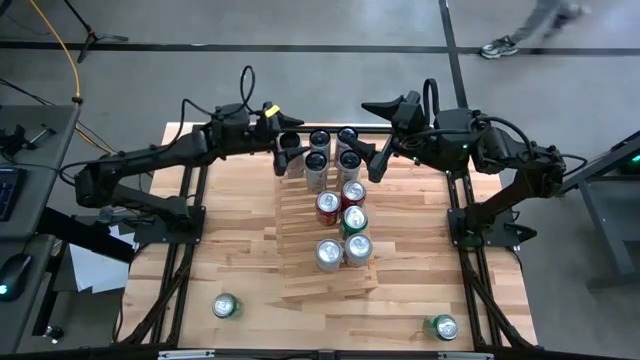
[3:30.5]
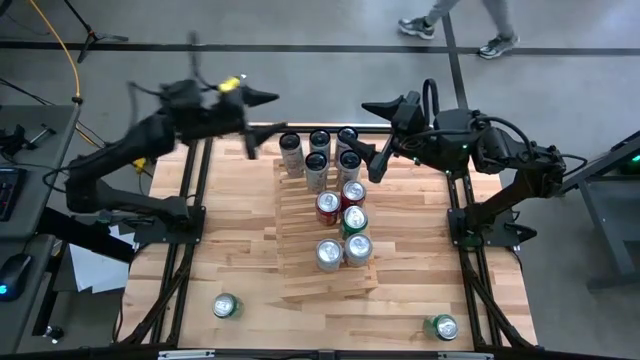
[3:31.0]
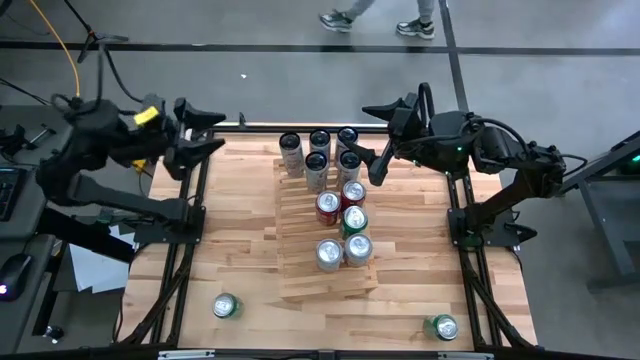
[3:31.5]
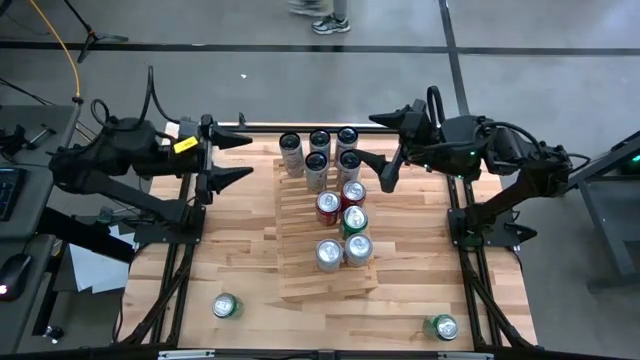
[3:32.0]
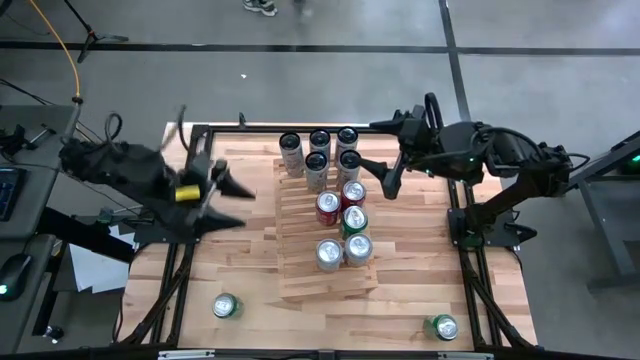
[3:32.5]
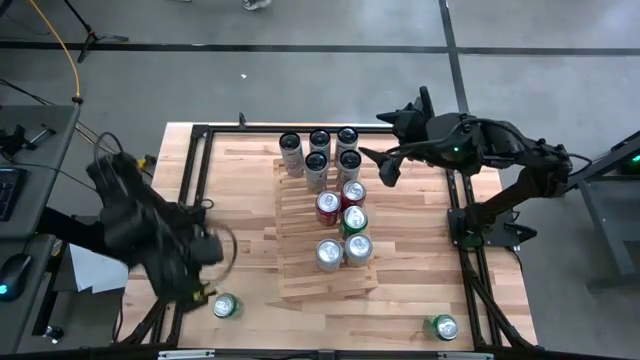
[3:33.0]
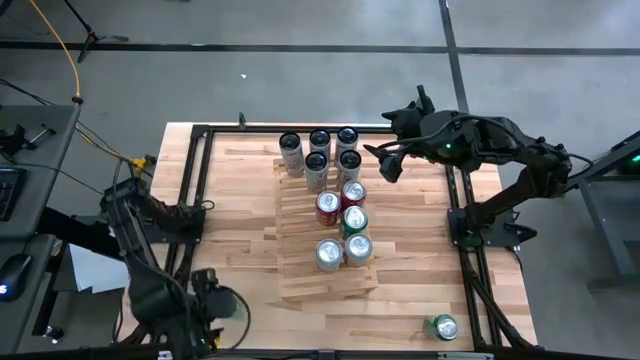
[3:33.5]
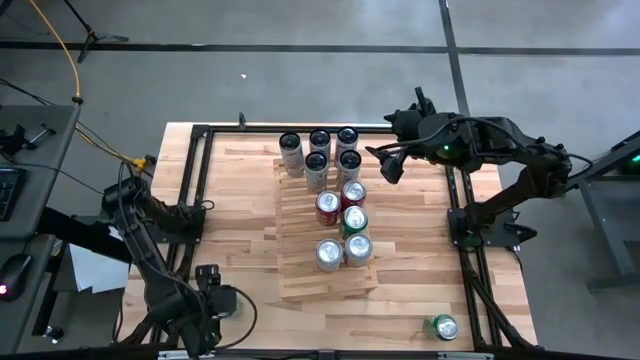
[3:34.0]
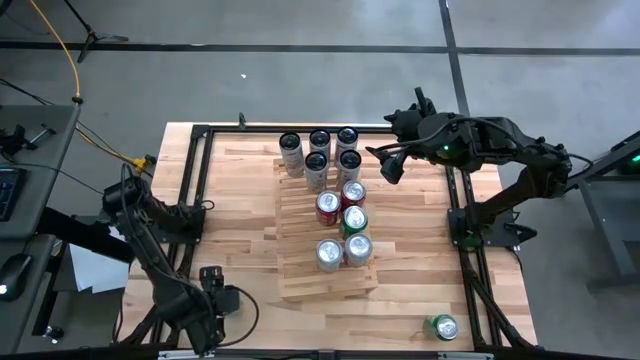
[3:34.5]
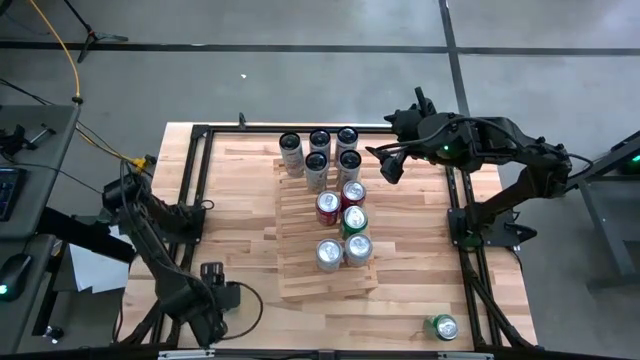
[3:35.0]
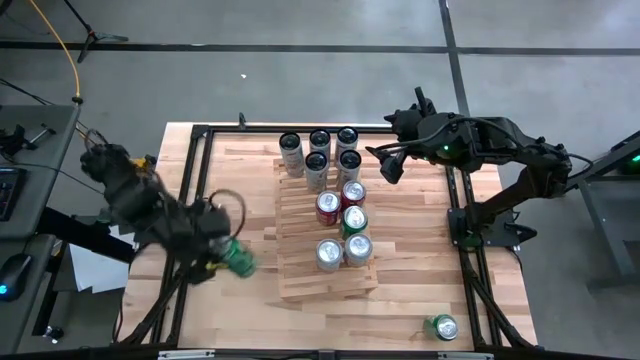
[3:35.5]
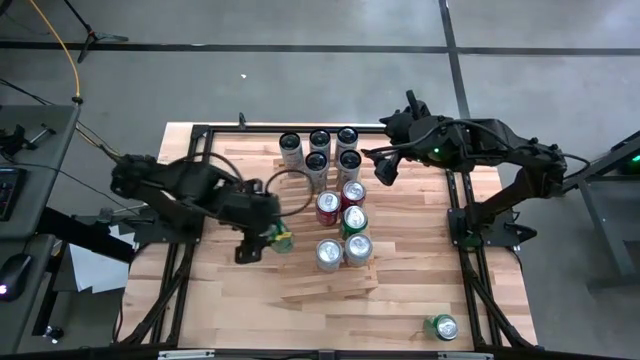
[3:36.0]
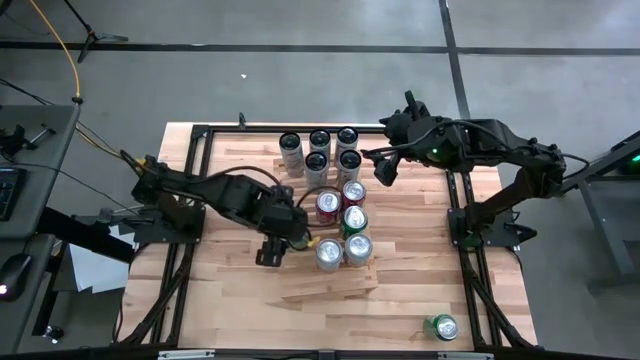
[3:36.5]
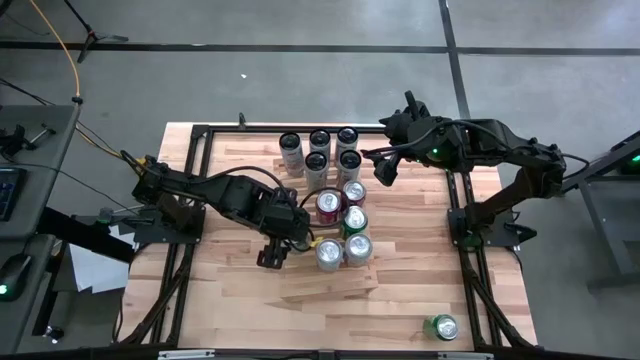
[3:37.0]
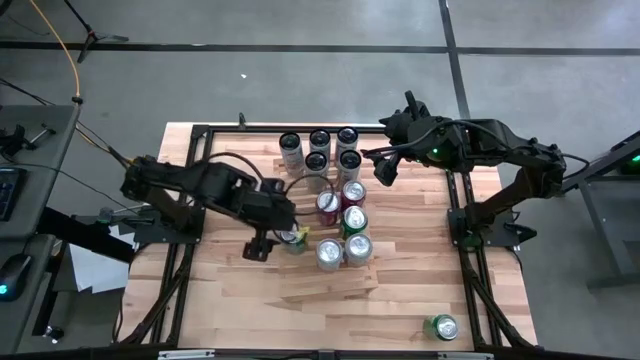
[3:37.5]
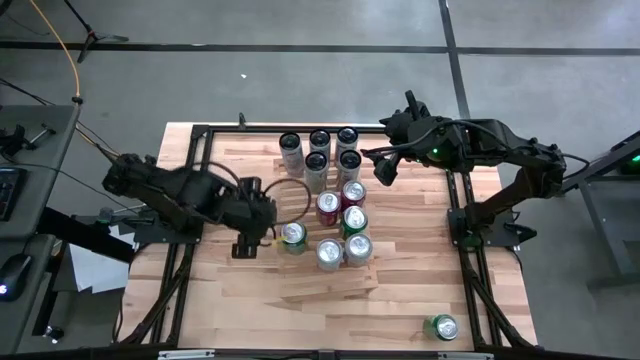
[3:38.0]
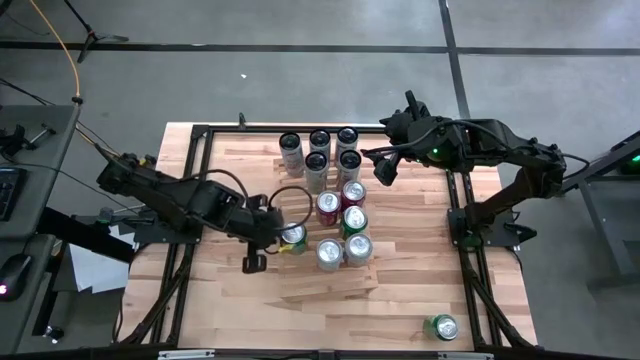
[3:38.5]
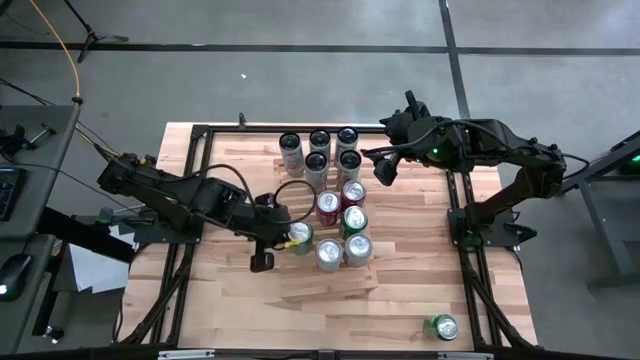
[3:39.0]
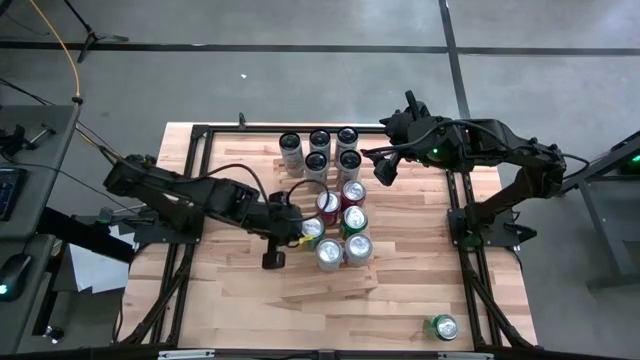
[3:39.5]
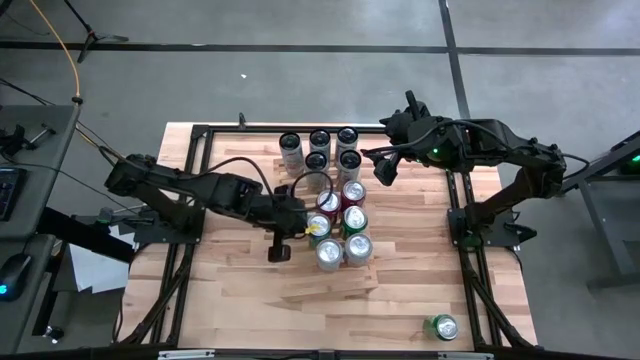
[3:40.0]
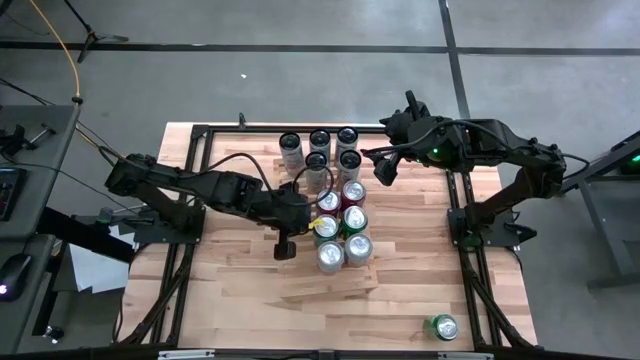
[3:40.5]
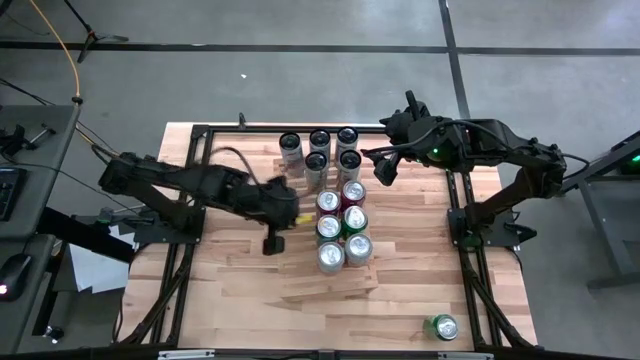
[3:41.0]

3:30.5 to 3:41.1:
Task: Place canned beverage on shelf
Put the green white soda can on the shelf

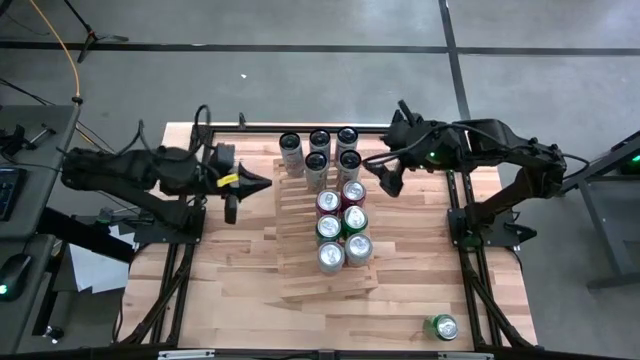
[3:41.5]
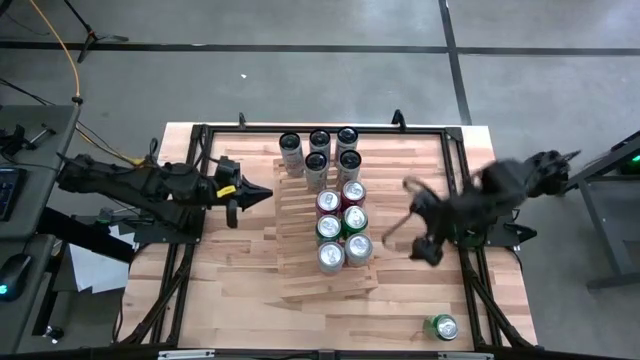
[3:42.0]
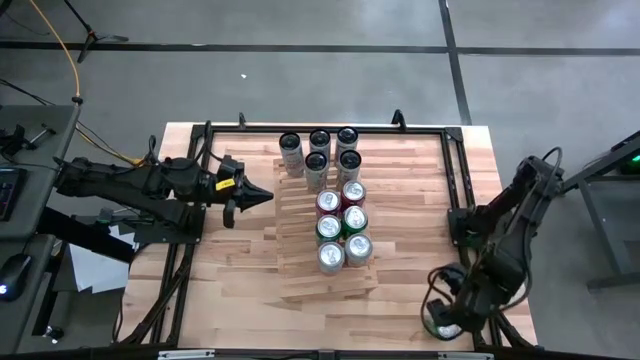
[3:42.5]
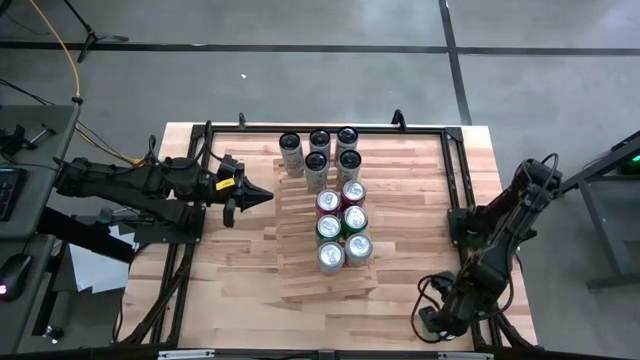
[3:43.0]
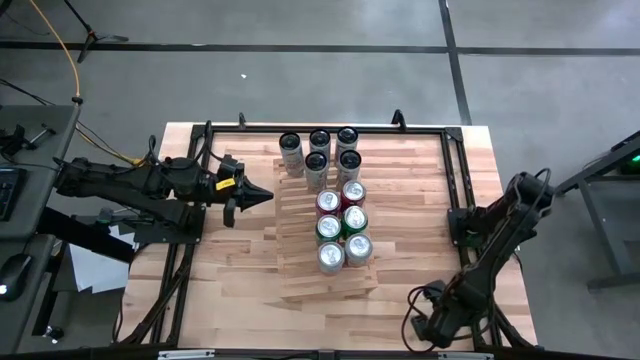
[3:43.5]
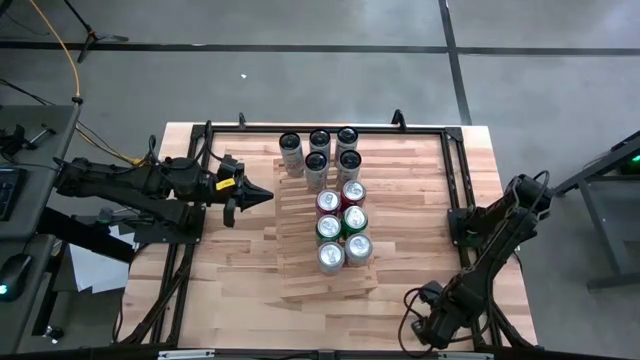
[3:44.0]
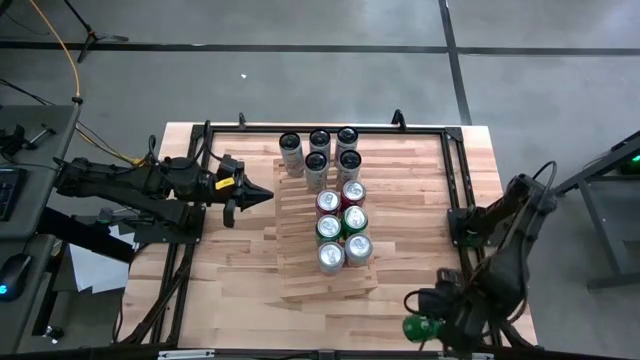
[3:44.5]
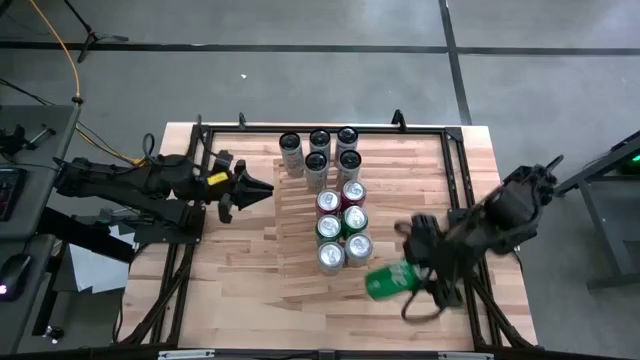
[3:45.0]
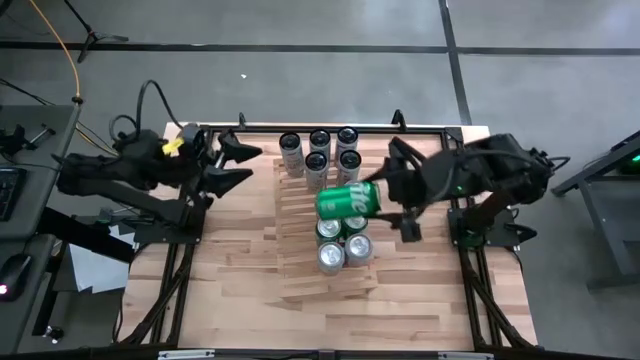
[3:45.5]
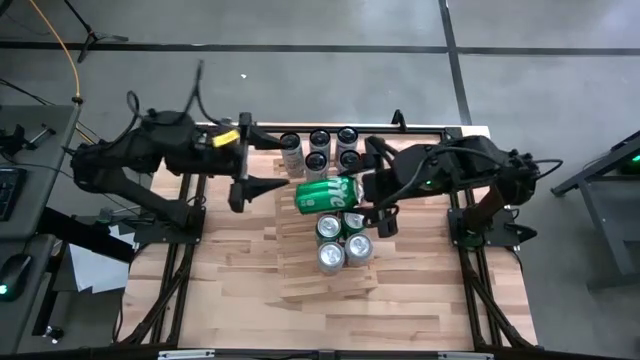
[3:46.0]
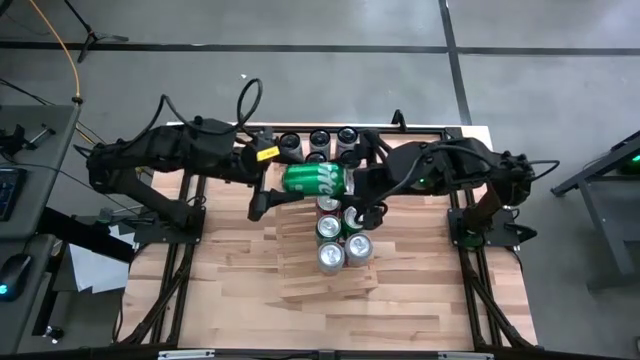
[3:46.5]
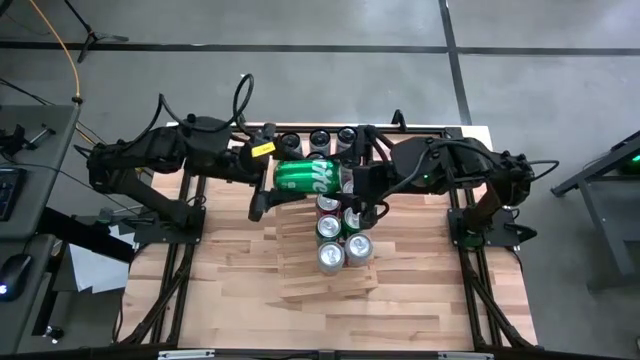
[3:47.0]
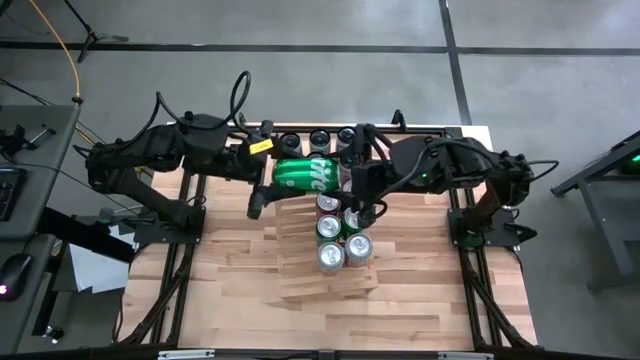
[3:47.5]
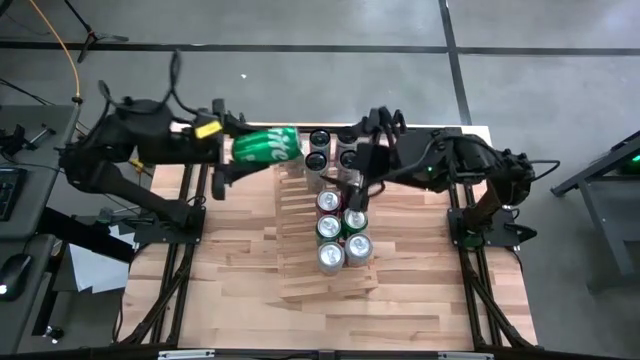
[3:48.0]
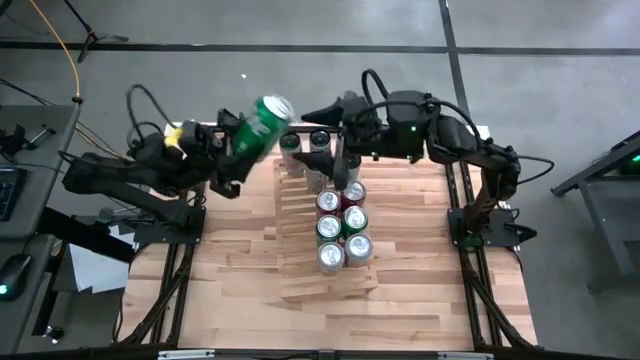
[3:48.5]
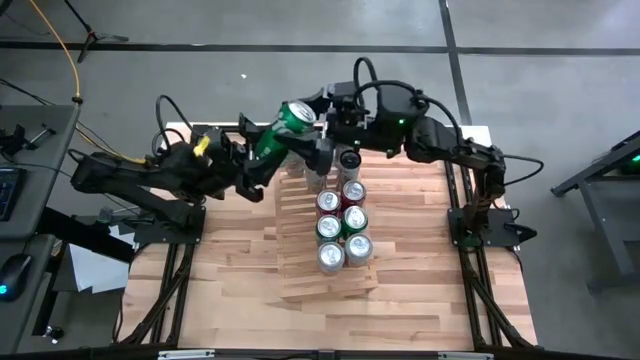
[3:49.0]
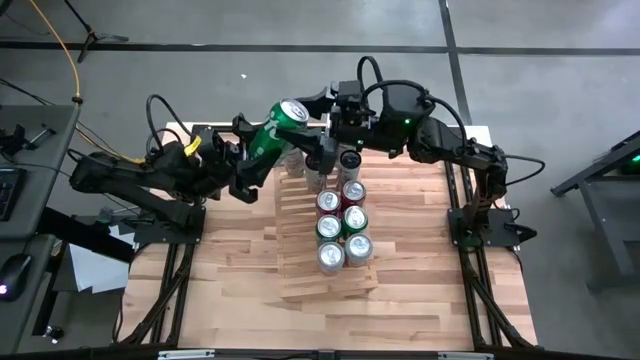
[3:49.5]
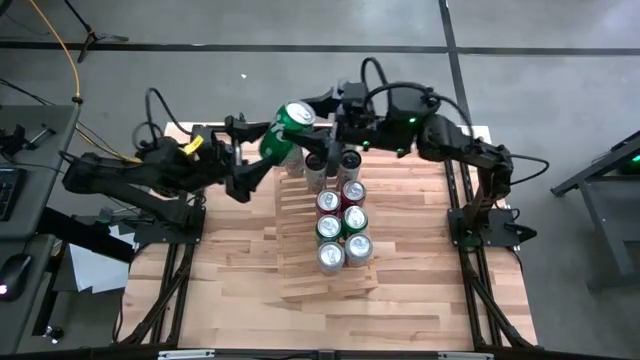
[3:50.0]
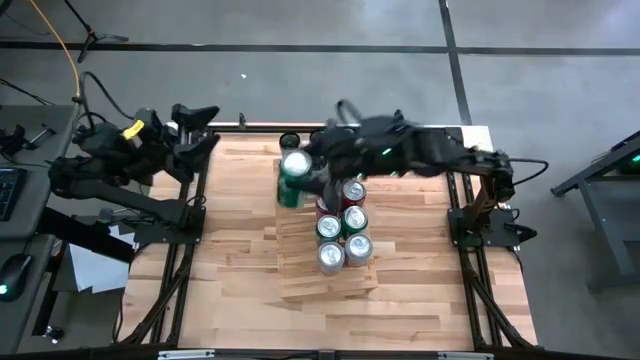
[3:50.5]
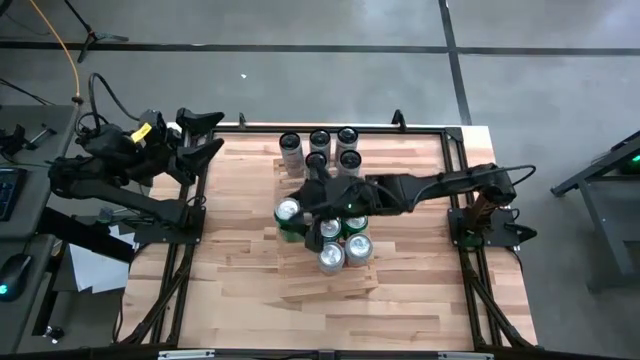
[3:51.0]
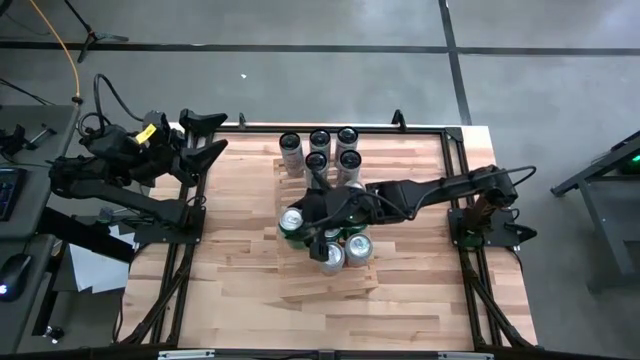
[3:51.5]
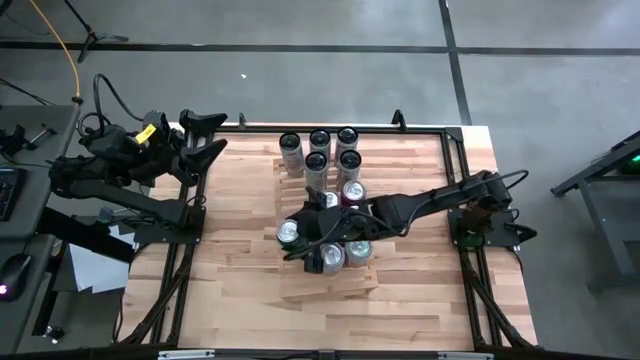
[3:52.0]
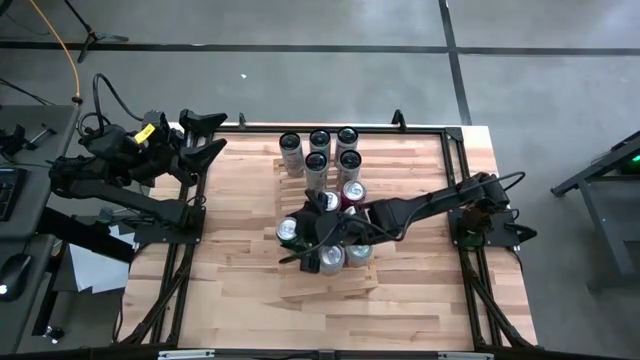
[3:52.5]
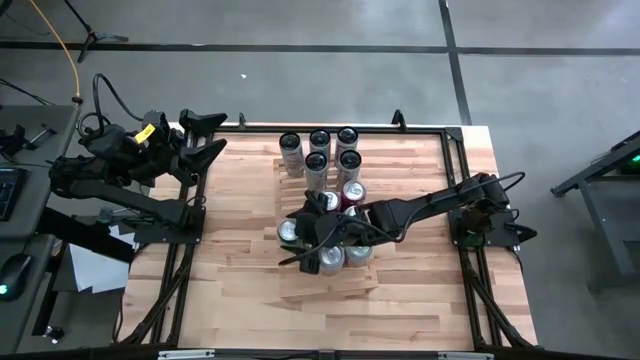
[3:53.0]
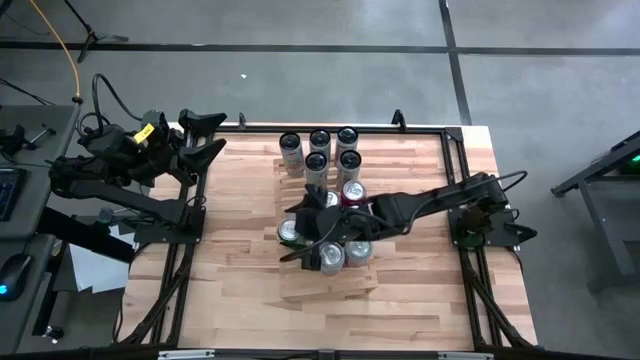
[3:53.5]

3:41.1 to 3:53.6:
Put the green white soda can on the shelf
